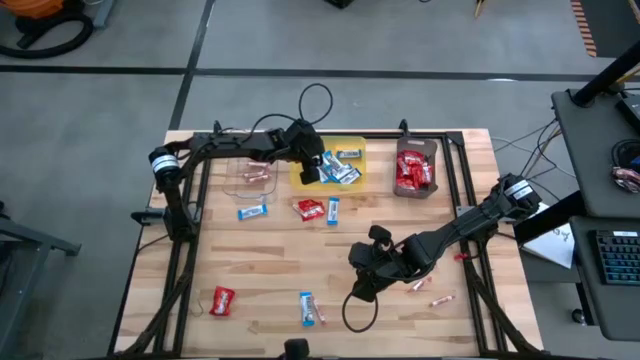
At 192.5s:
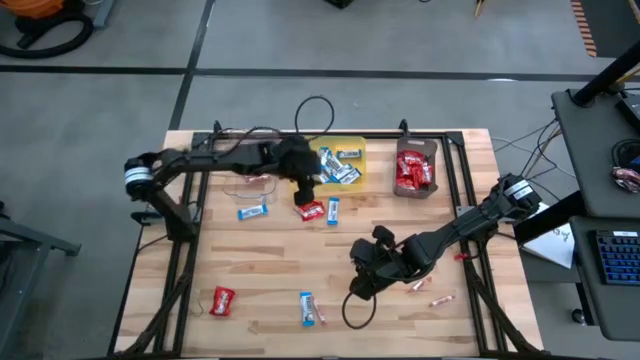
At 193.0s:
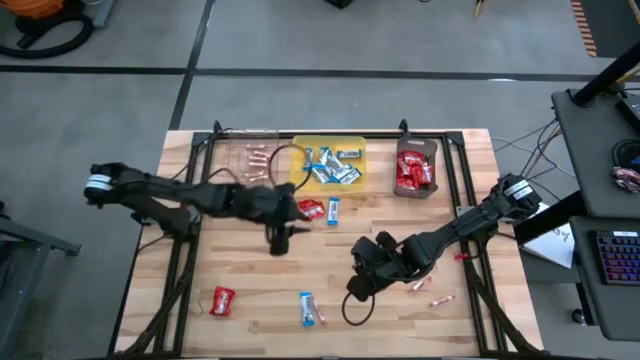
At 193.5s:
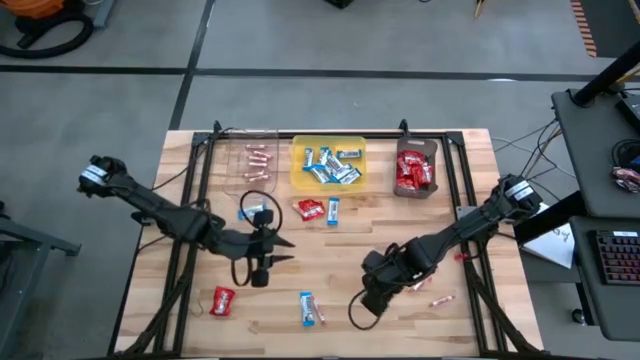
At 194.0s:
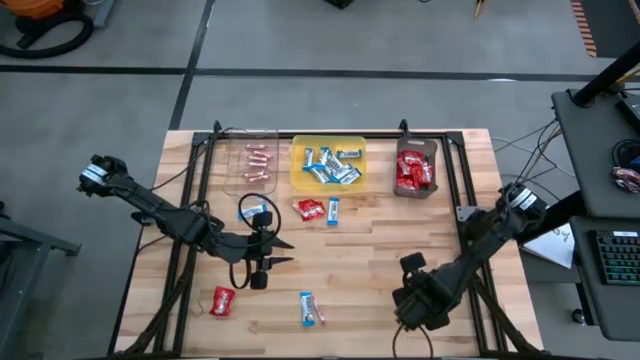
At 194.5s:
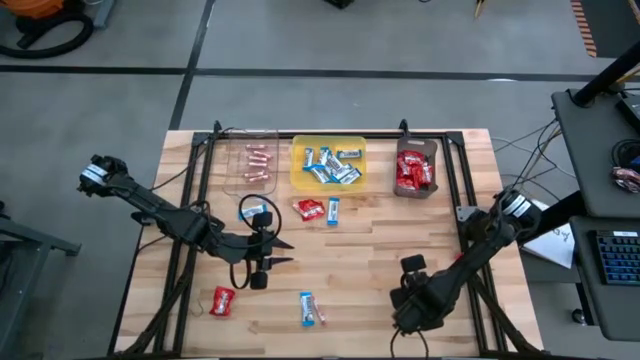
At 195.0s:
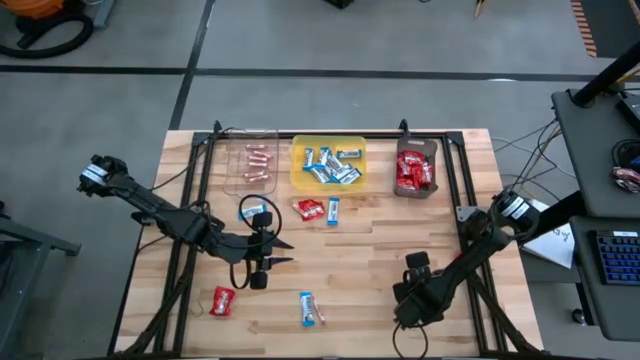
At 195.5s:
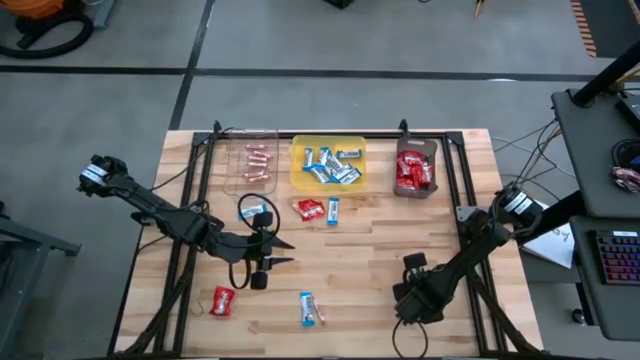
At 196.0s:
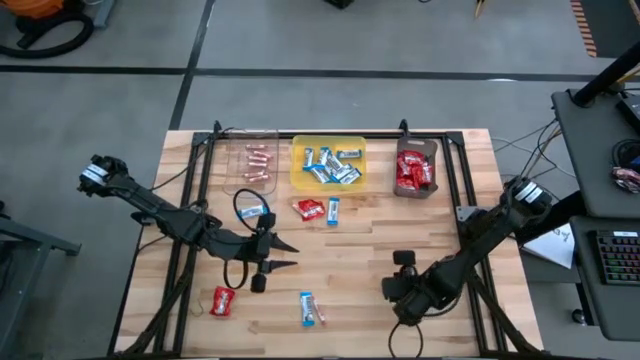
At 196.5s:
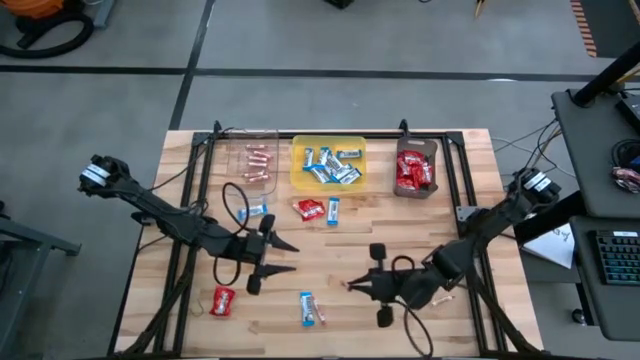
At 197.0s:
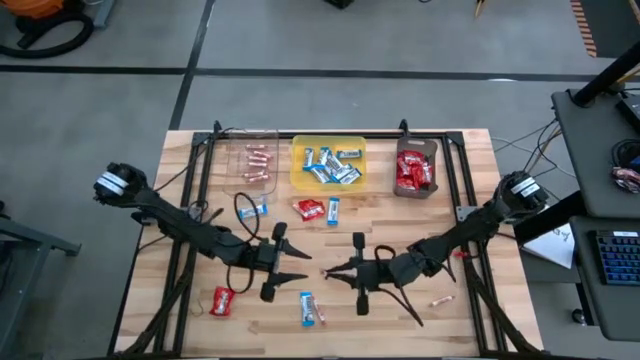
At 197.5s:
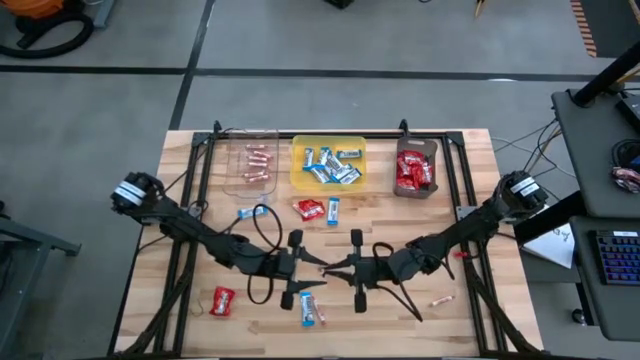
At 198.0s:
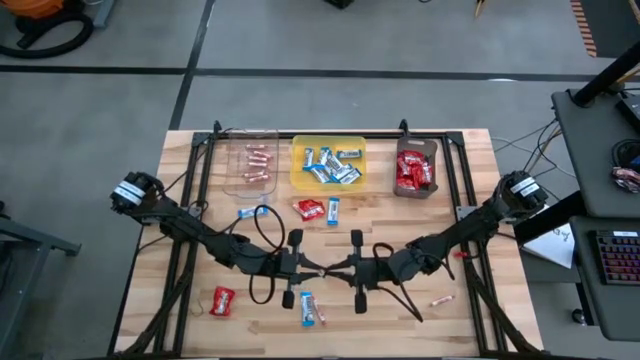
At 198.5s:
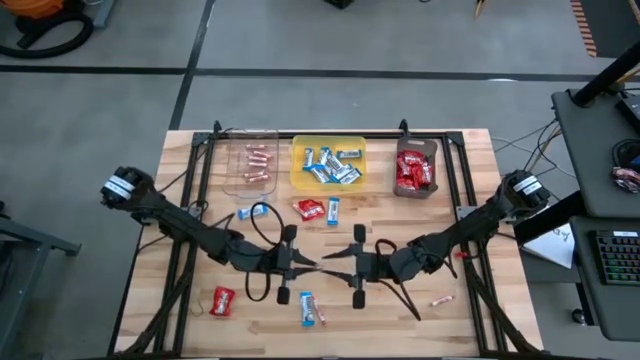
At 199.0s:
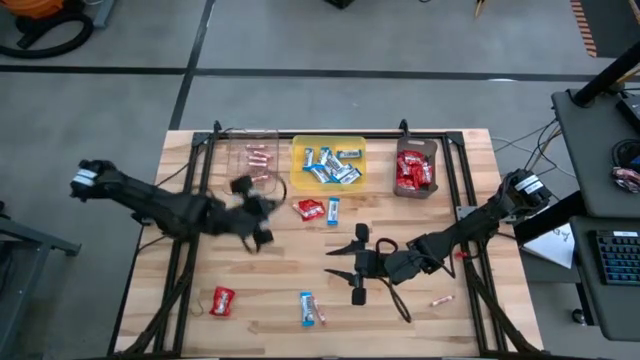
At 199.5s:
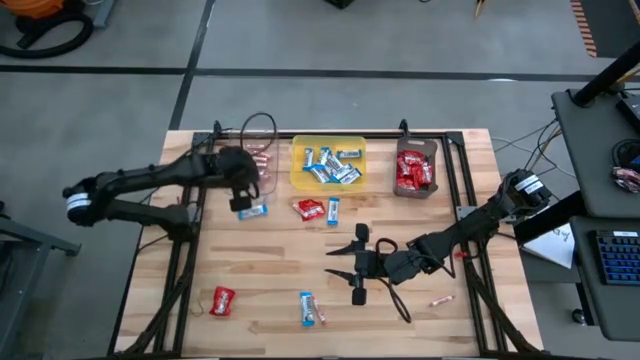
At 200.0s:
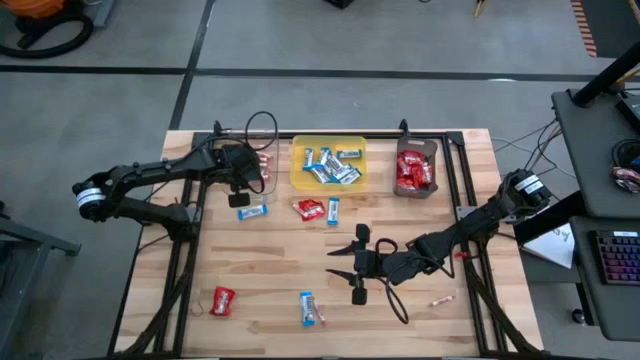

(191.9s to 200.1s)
Task: Sort candy
Put the orange candy into the transparent bin

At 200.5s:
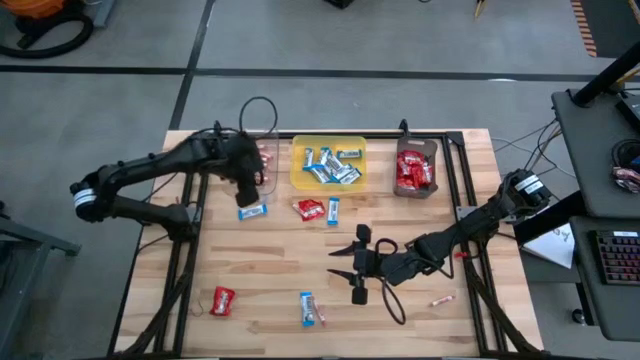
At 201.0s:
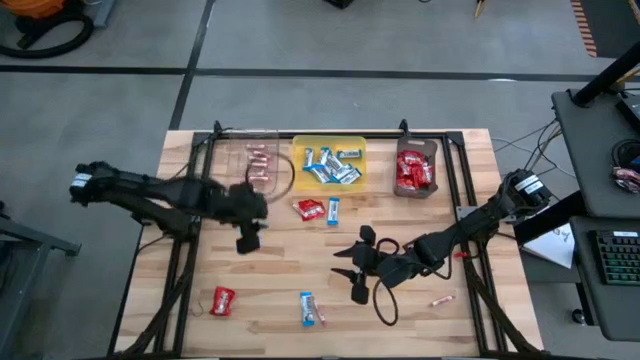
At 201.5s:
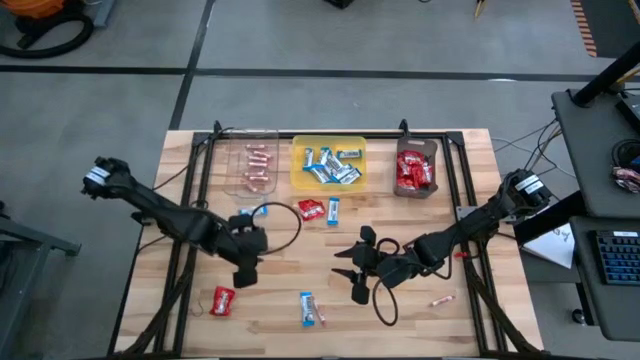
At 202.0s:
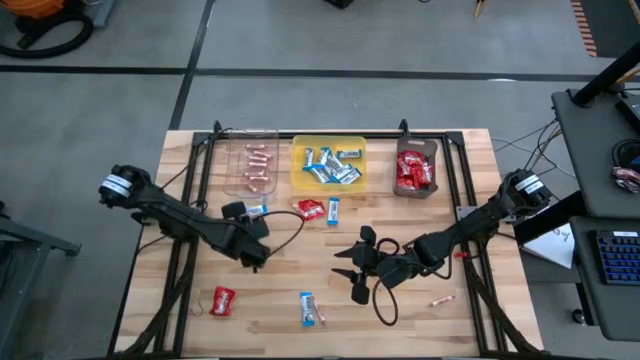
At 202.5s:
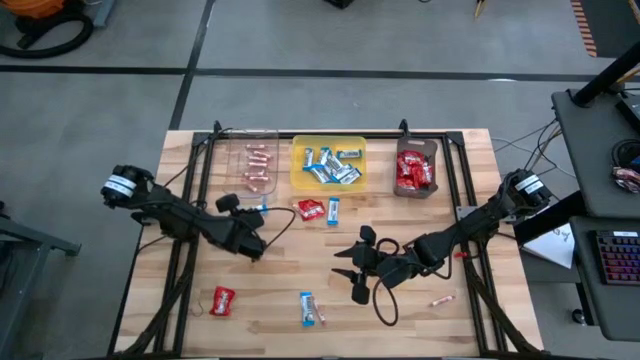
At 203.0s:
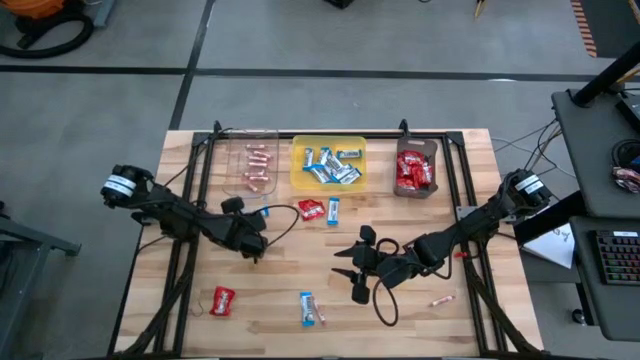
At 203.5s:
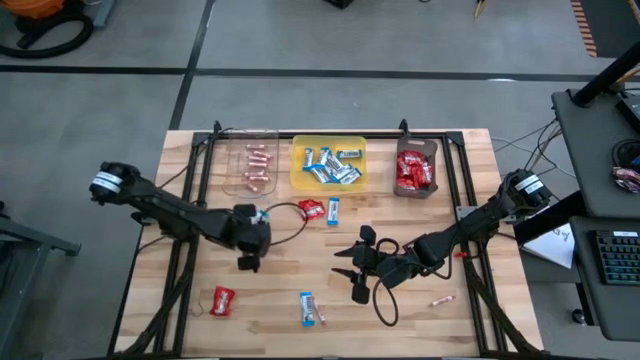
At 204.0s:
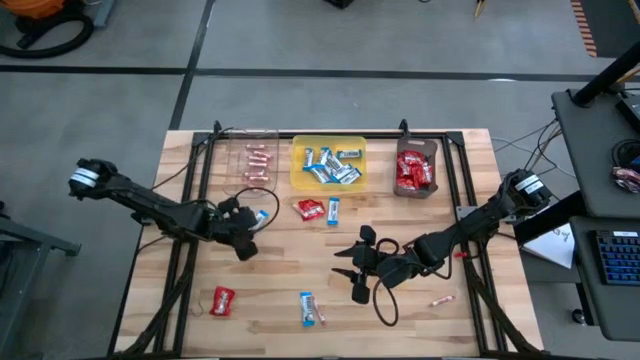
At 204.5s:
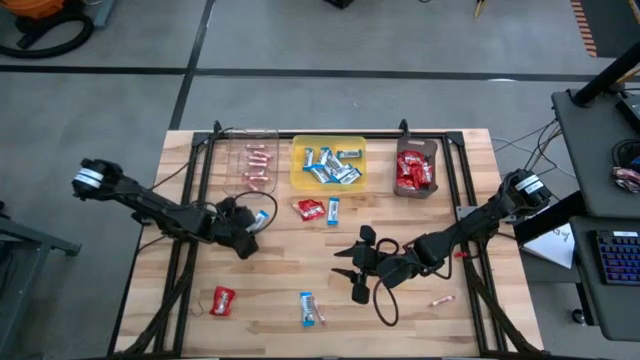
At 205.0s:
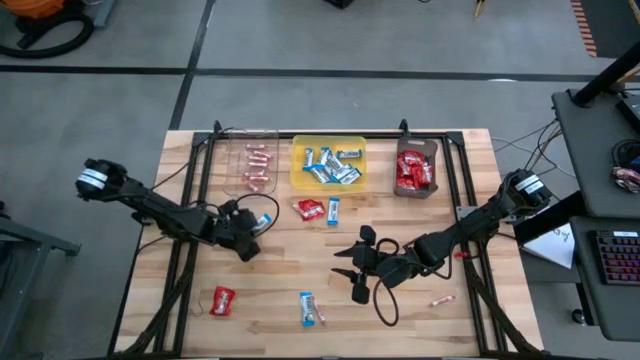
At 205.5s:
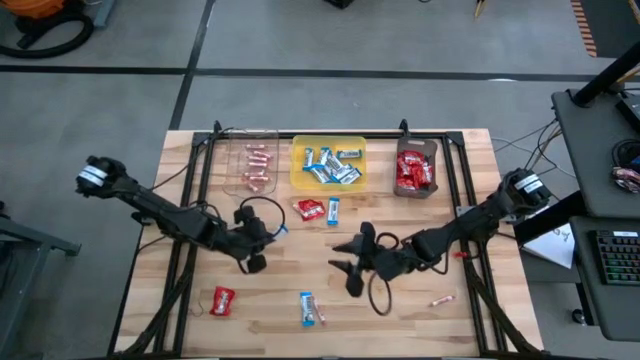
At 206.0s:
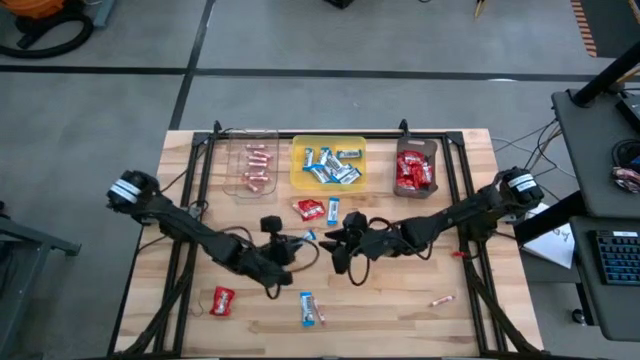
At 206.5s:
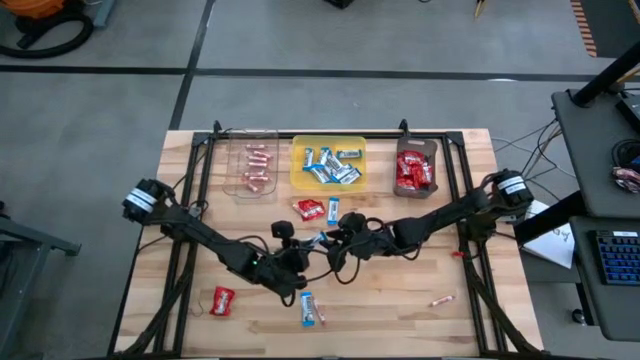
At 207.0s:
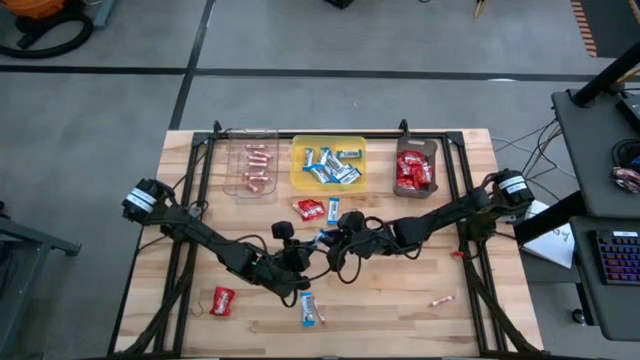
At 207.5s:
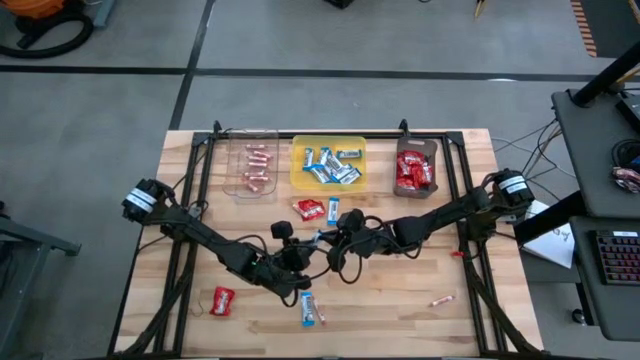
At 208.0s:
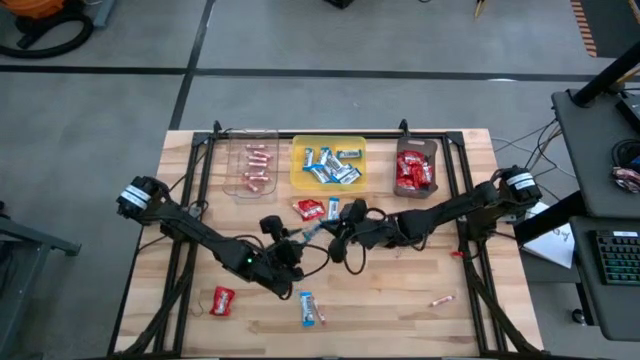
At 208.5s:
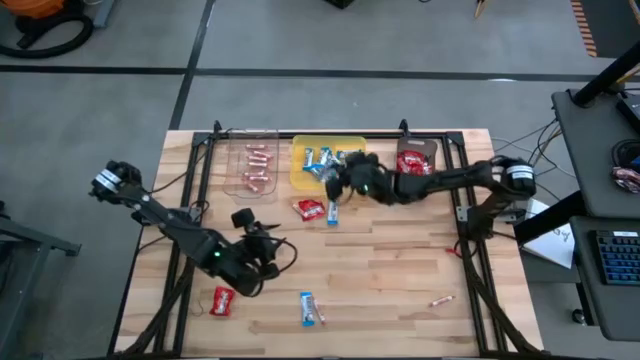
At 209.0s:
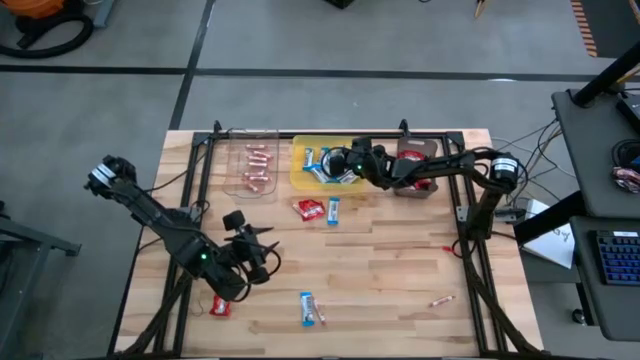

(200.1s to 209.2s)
Put the white chocolate into the yellow bin

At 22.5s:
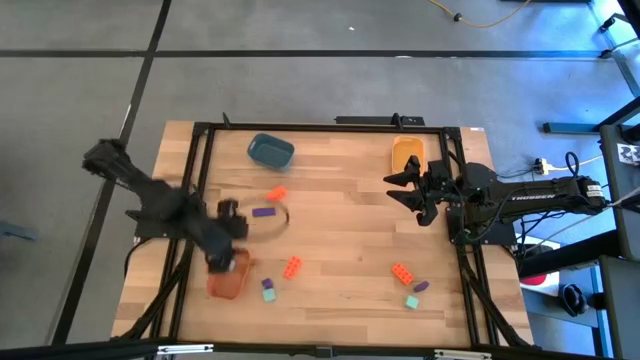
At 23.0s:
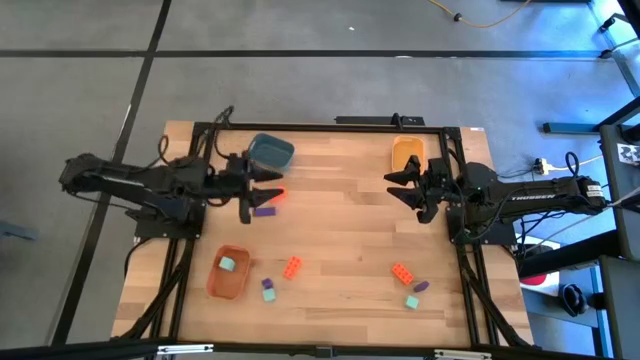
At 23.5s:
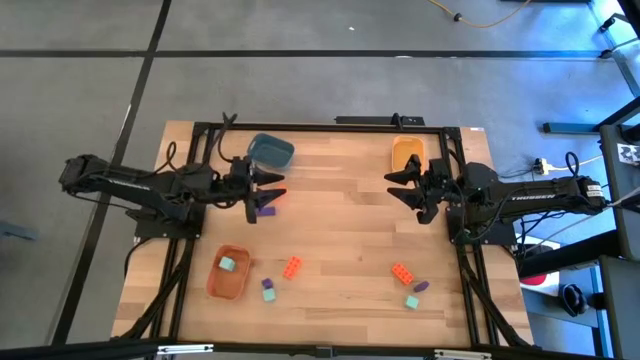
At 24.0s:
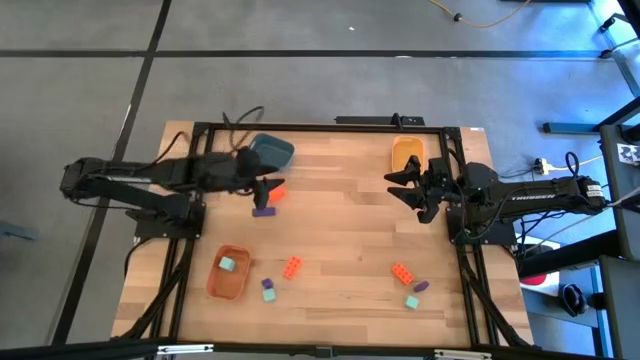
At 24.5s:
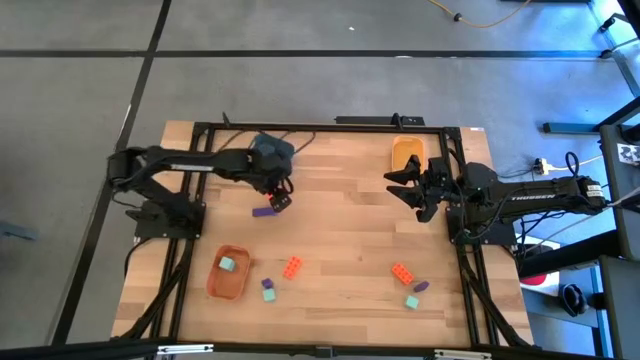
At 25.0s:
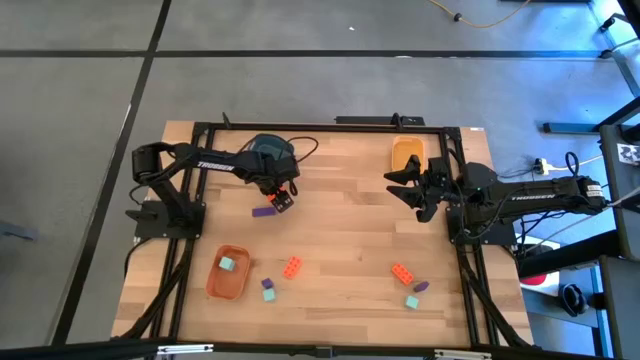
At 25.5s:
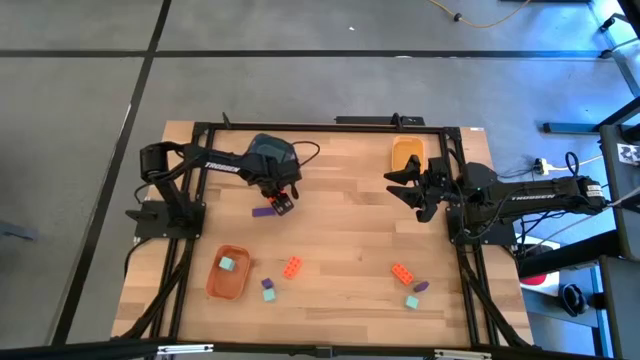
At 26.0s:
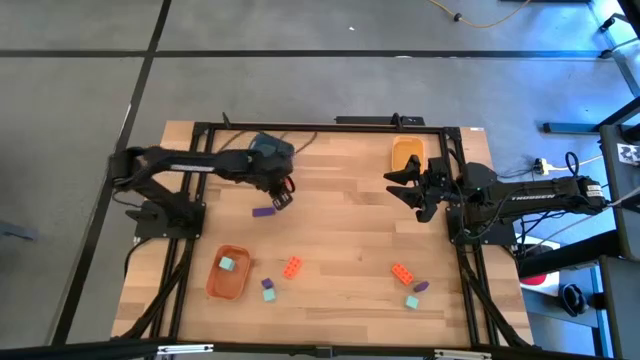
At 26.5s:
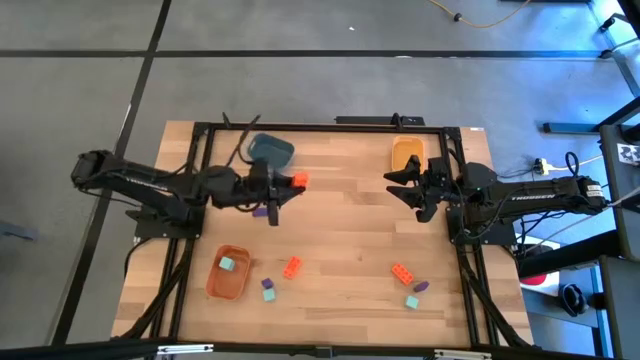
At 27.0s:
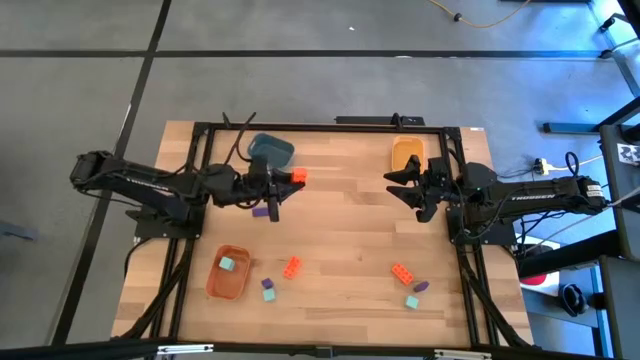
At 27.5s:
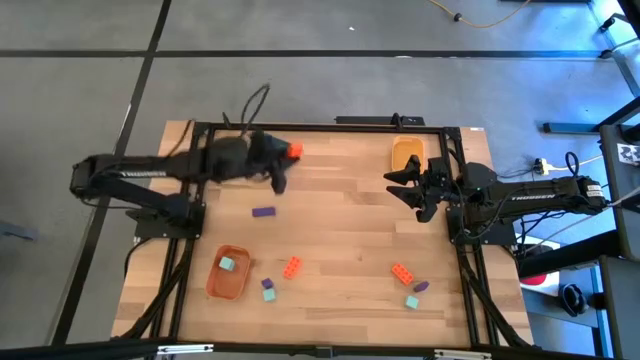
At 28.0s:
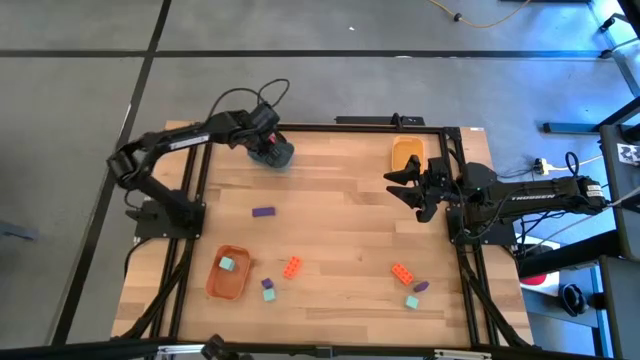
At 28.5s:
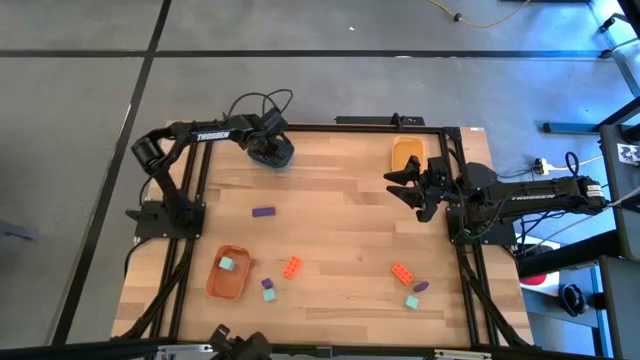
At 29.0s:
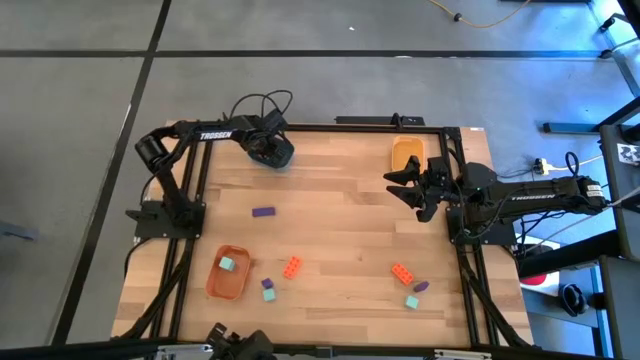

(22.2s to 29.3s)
Task: Sort & place blocks by color
Put the top orange game piece into the blue bin
